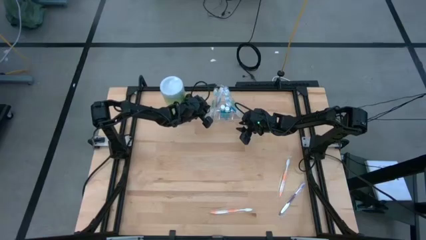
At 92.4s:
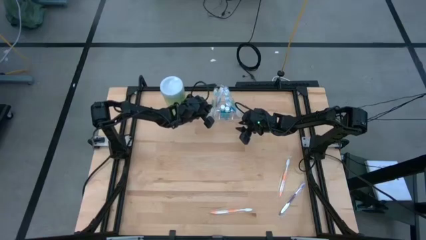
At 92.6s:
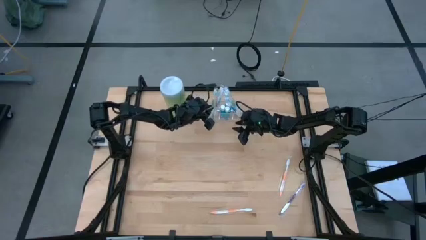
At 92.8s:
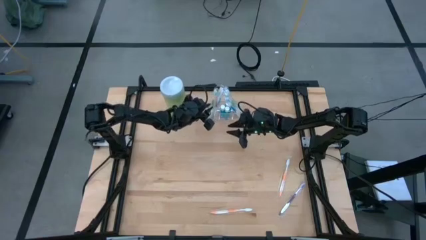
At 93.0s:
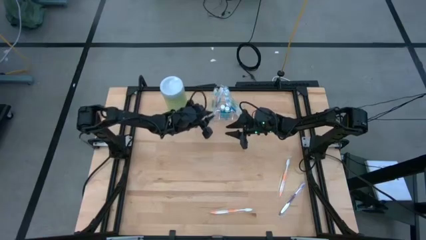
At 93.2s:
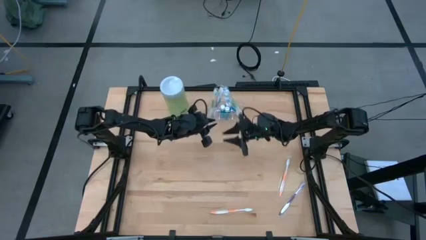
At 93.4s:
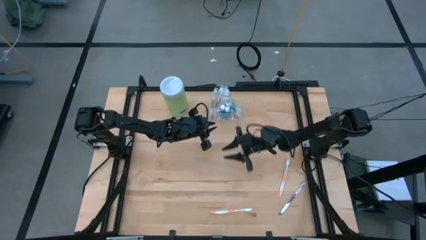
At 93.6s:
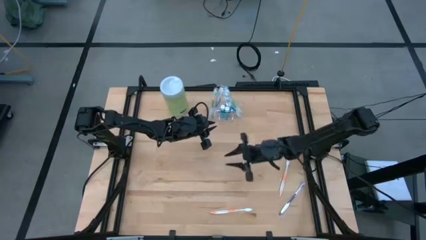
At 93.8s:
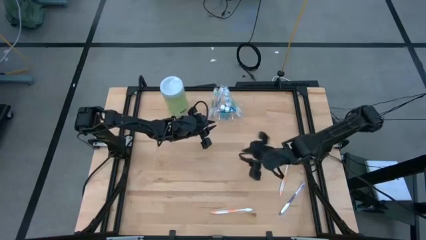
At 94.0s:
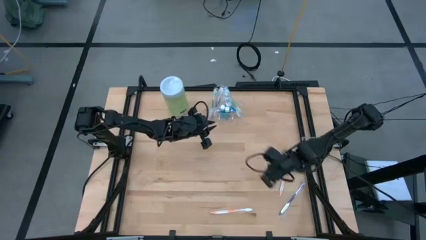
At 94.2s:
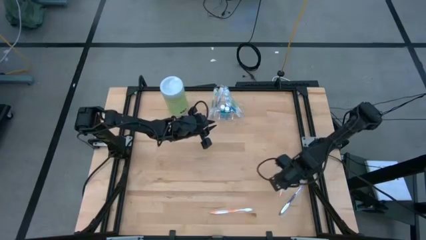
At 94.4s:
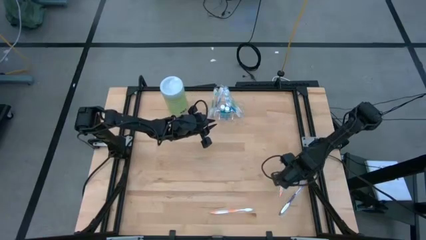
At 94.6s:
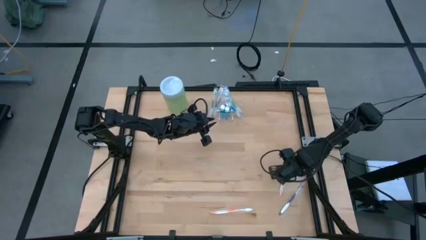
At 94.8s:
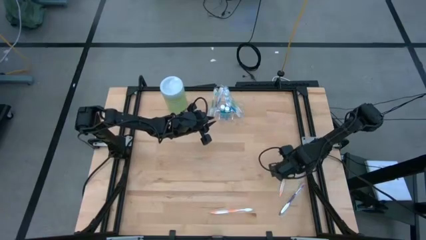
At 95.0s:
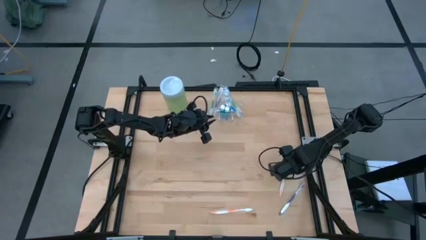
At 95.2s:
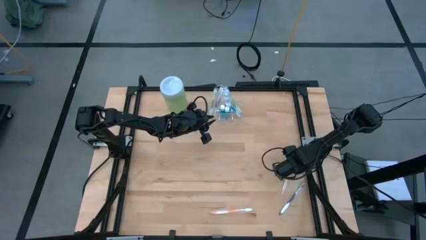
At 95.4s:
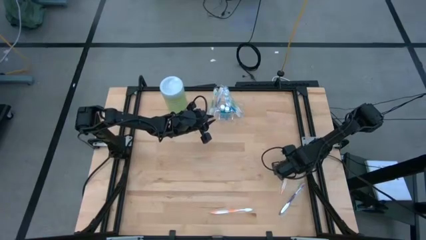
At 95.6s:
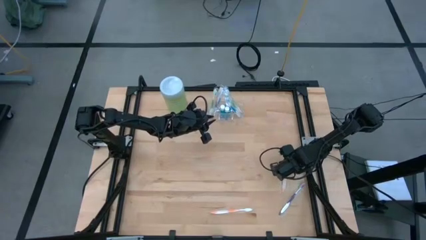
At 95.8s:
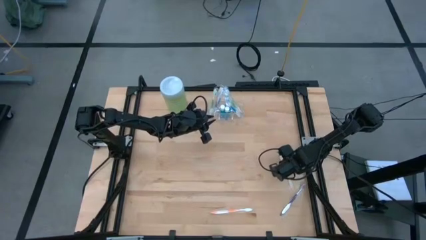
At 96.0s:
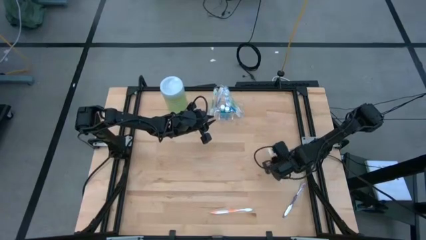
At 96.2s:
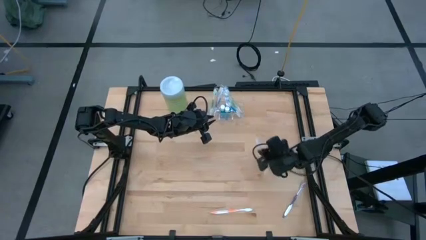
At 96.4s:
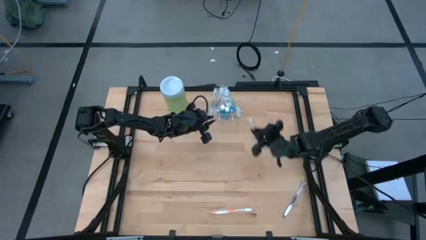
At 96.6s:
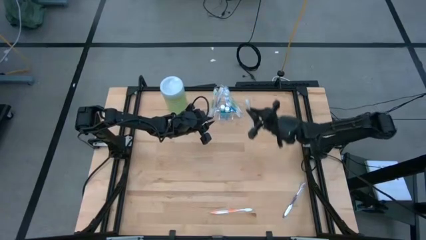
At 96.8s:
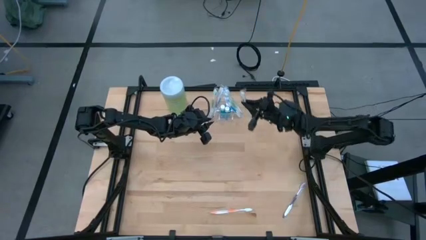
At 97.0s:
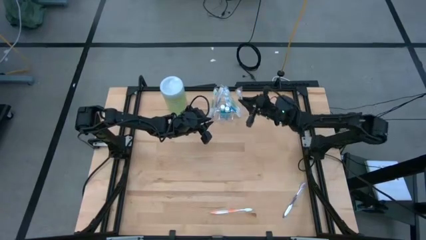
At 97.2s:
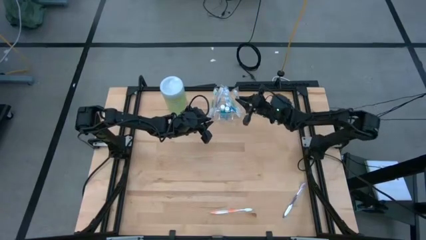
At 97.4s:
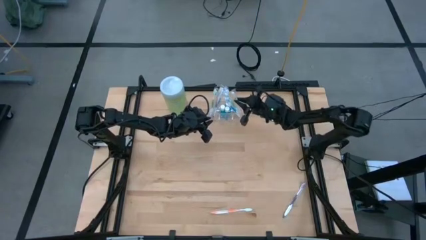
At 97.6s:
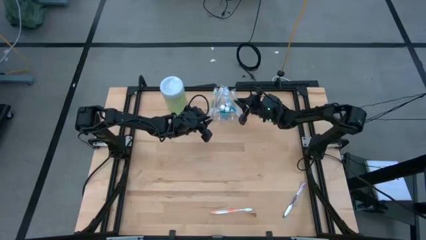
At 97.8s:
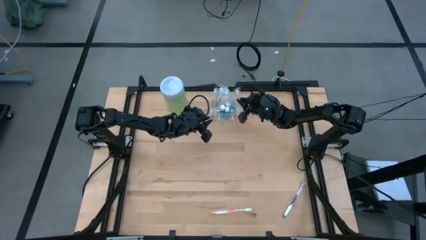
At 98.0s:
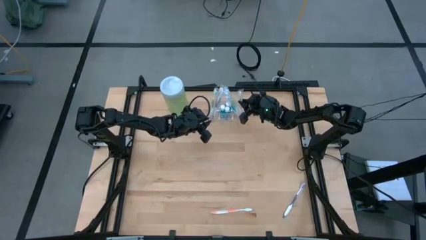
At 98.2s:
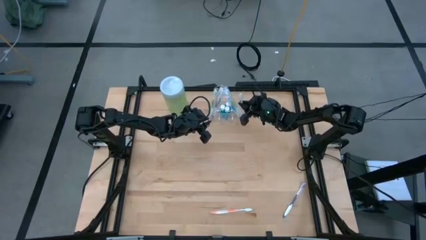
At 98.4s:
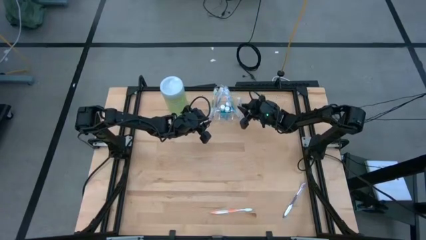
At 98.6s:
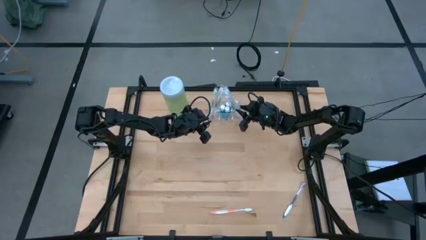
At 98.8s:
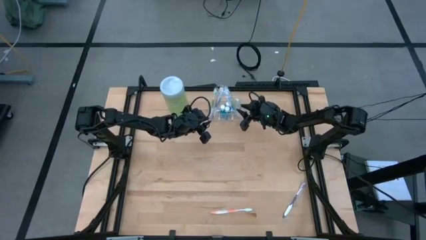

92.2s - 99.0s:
Task: Pick & Place toothbrushing station
Put the right orange toothbrush into the transparent organizer

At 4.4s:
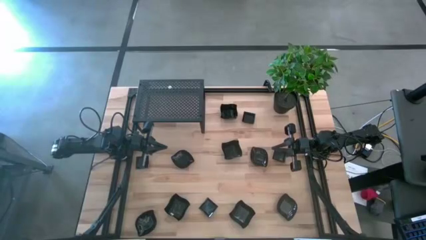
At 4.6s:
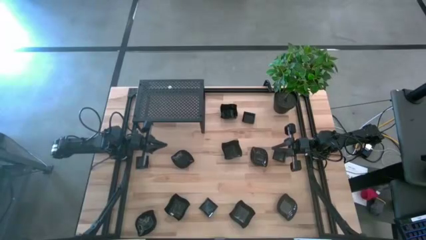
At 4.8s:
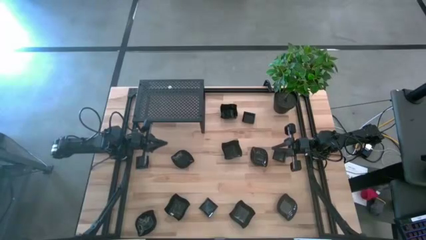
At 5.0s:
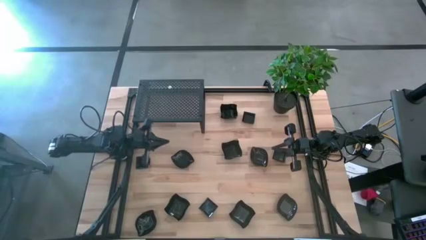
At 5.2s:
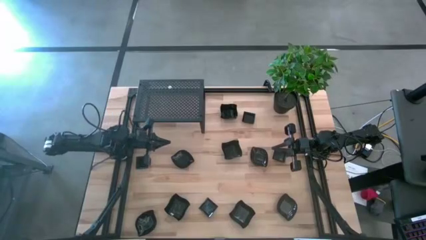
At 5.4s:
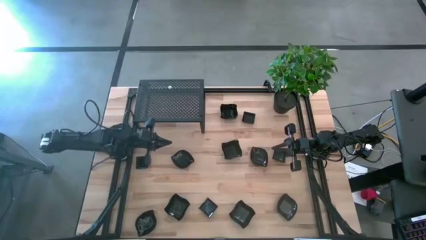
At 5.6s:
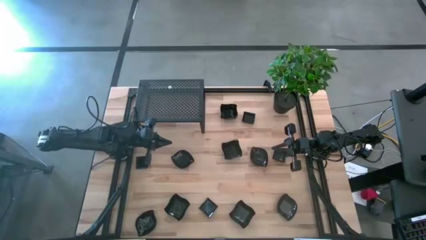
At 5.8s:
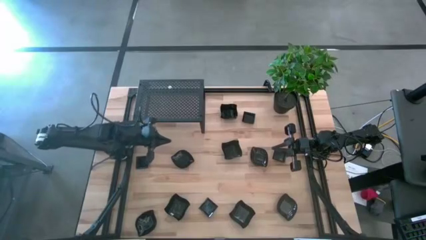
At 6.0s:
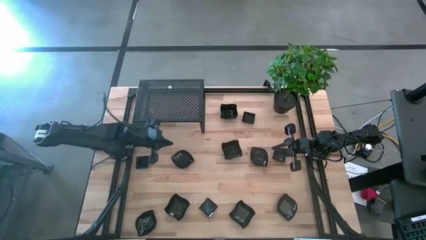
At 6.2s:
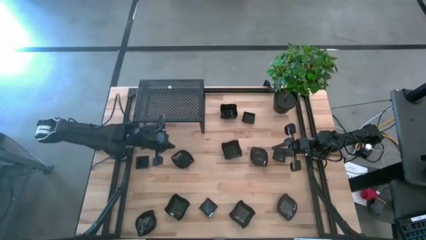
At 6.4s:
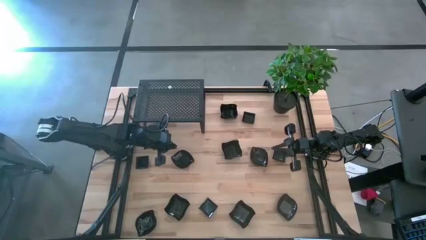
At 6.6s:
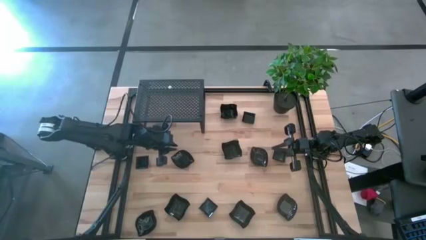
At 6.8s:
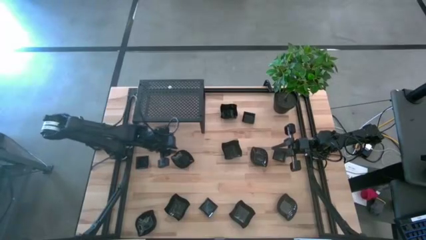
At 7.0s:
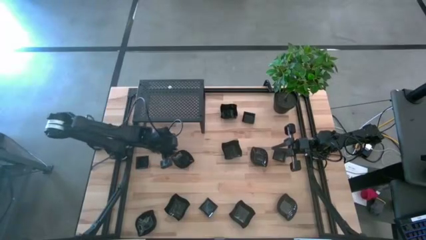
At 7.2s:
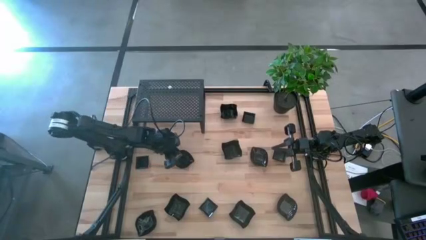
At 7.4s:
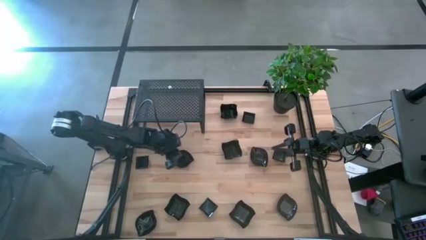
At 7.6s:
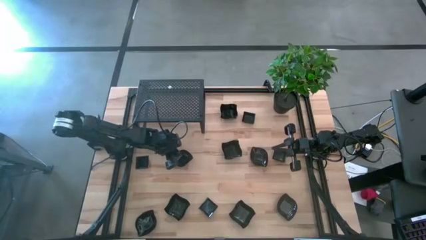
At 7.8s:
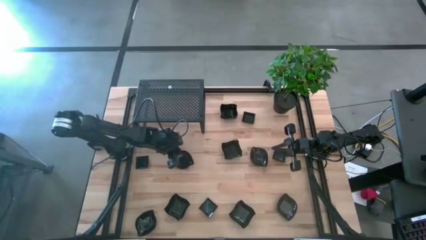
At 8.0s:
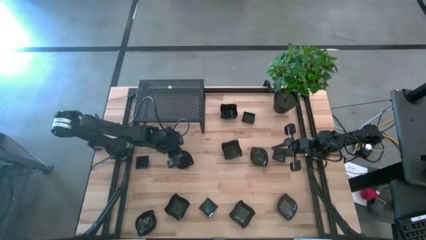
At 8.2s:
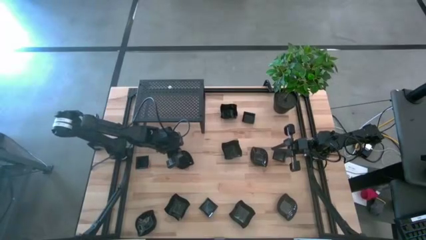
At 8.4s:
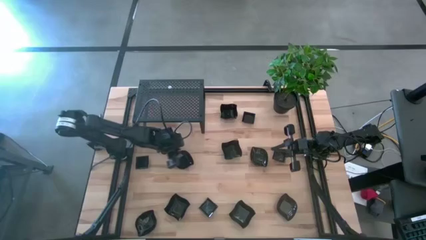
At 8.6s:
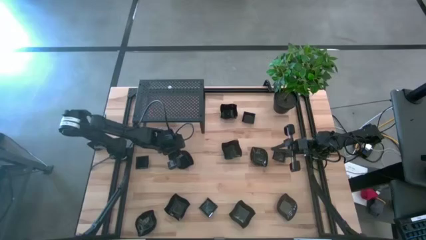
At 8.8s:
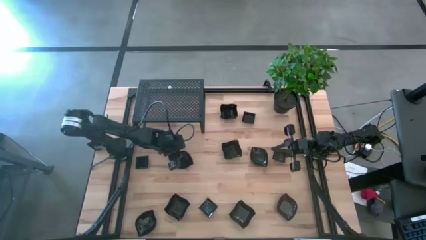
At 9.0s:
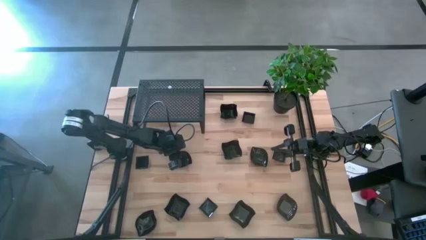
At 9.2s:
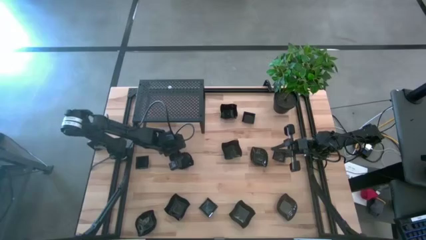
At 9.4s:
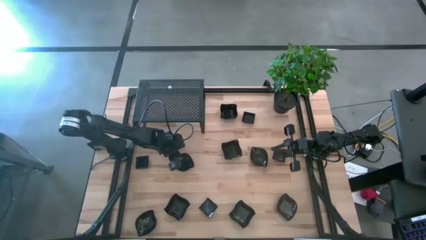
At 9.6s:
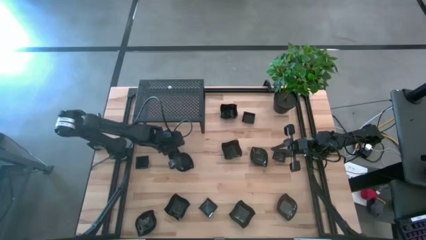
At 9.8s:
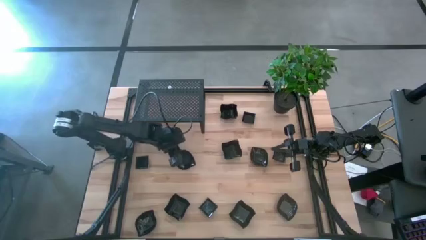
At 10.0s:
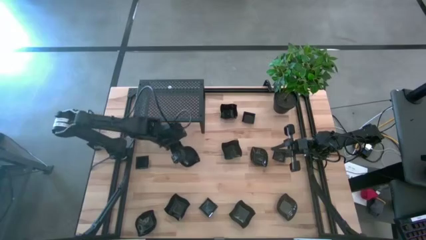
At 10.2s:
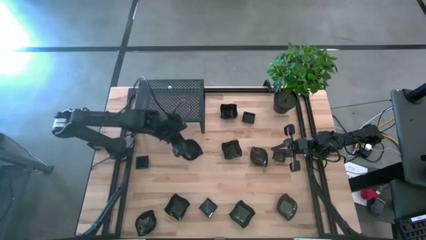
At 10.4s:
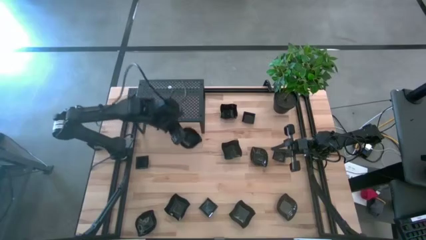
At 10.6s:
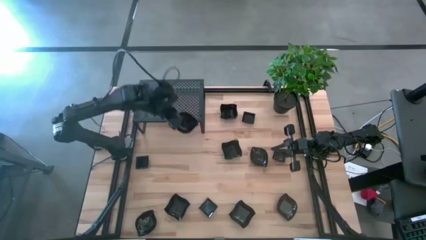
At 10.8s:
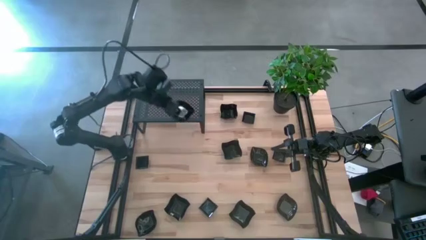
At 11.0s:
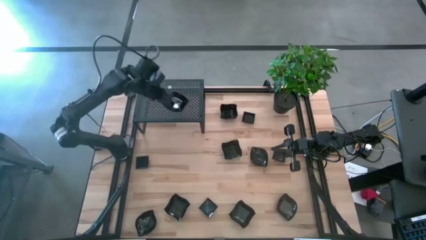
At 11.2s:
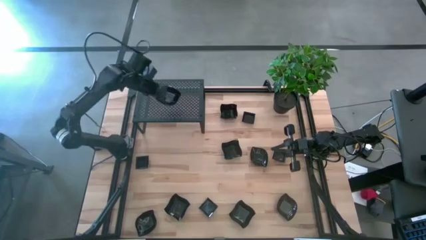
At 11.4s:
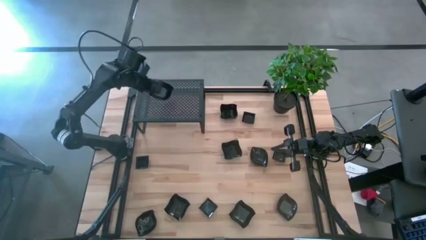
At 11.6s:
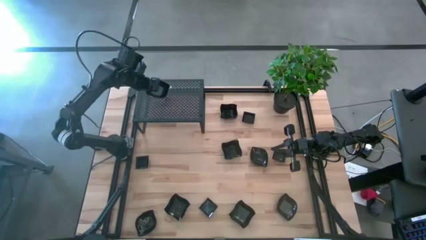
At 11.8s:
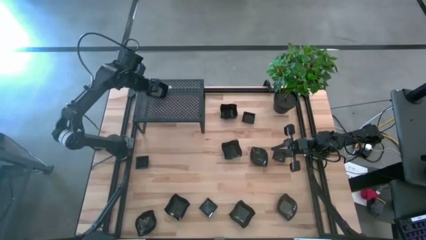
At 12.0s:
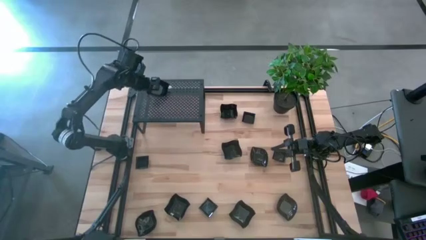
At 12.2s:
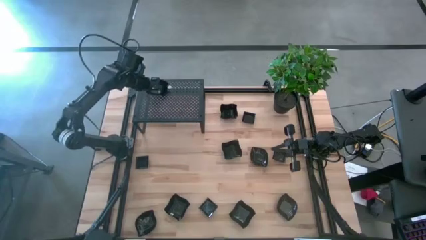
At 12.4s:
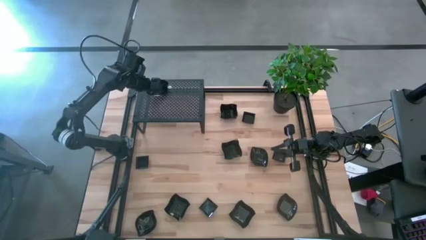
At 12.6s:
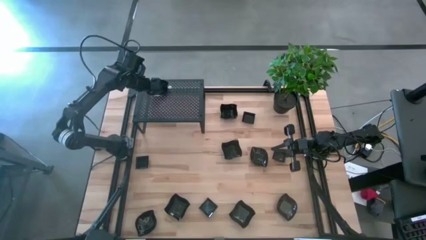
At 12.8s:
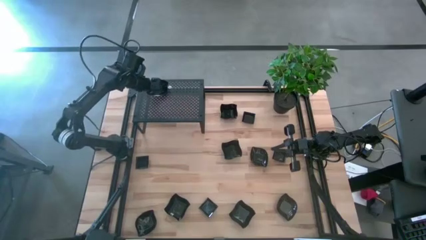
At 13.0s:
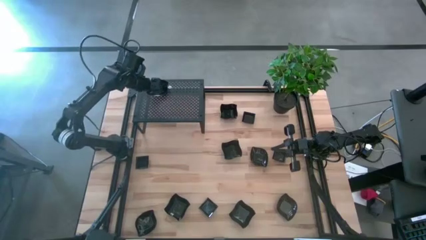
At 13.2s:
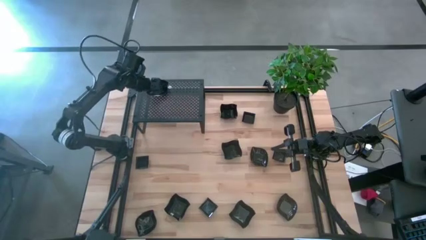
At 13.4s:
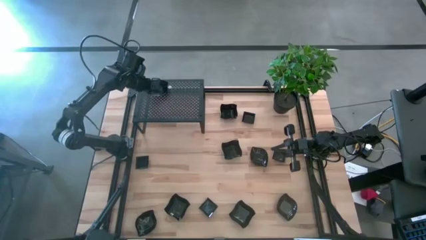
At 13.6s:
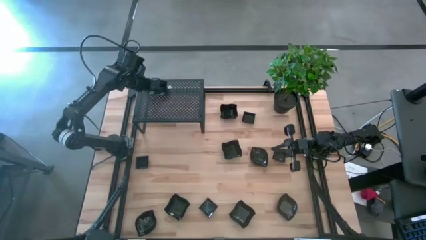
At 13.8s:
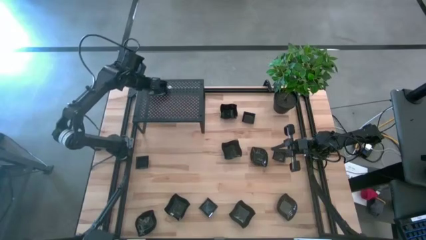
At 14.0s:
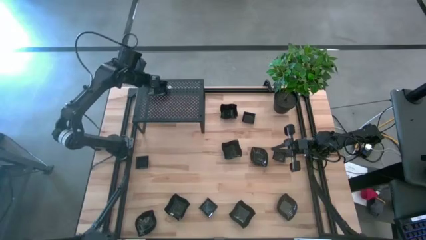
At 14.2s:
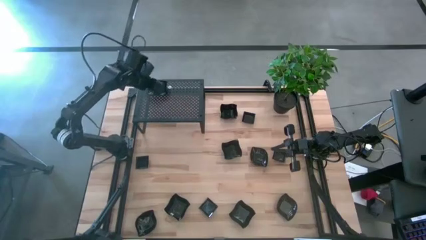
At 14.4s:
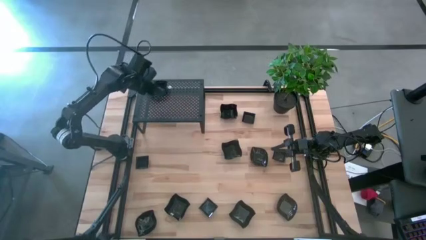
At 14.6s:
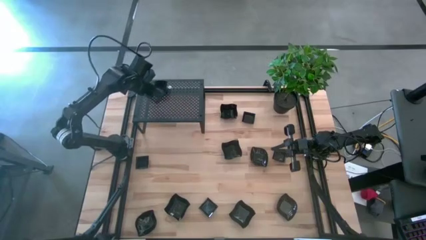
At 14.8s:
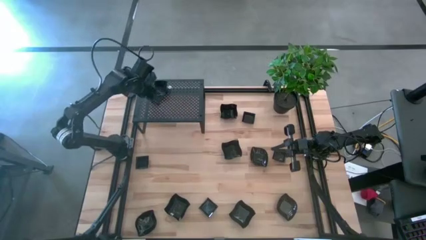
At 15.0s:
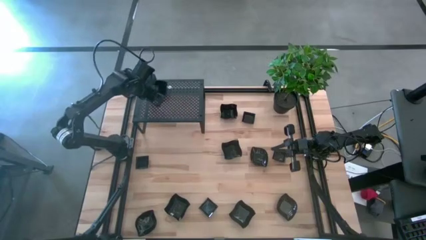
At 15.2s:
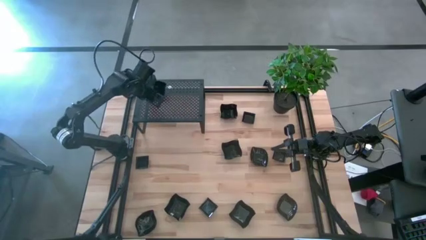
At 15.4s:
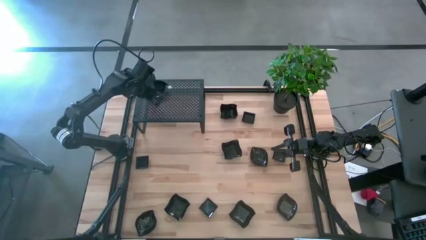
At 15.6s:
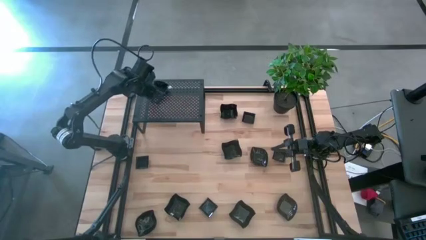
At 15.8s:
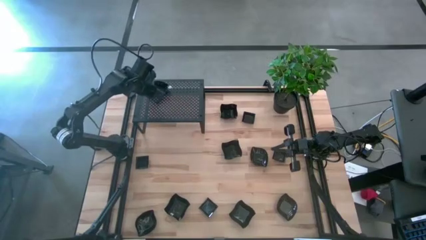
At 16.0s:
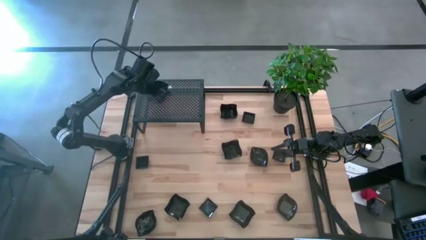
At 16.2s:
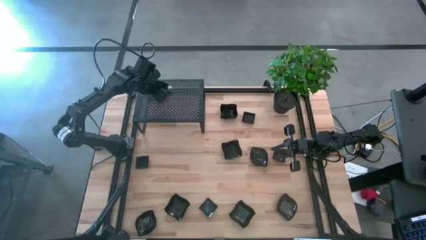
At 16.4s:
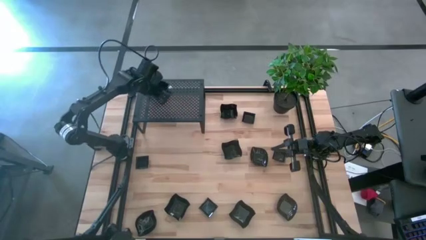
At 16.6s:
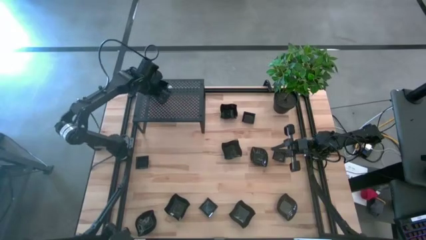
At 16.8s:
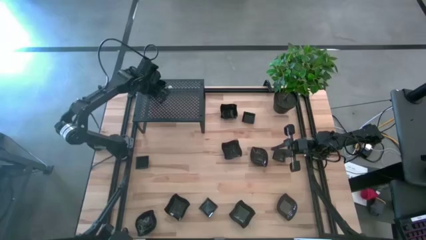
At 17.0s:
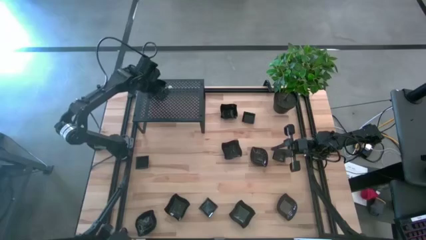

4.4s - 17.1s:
Task: Pick & Place Mini shaped plates
Put the leaf shaped plate on the shelf
